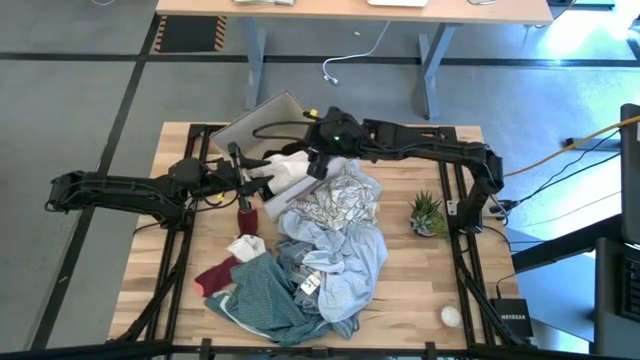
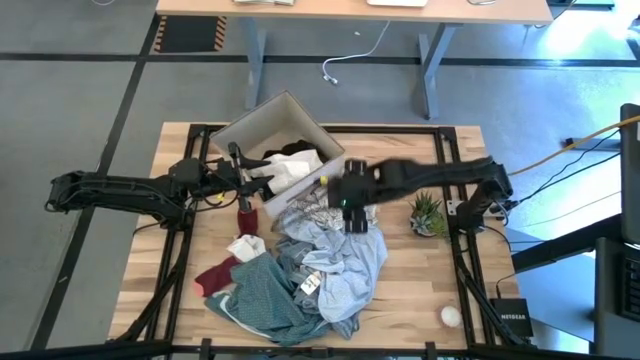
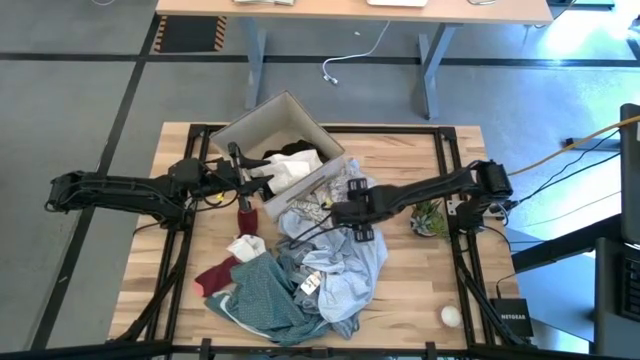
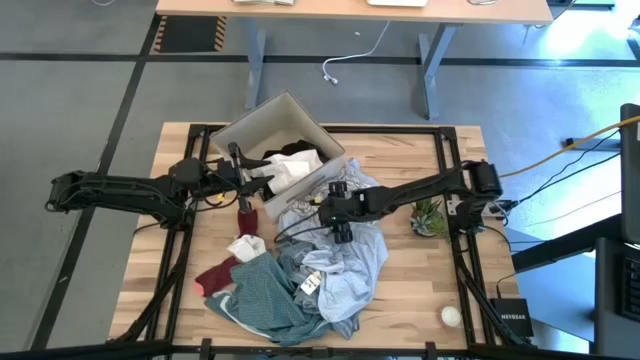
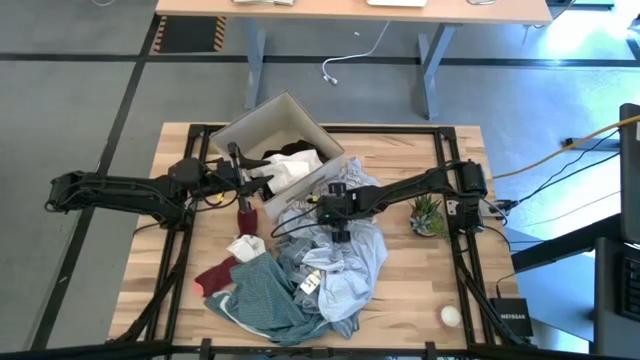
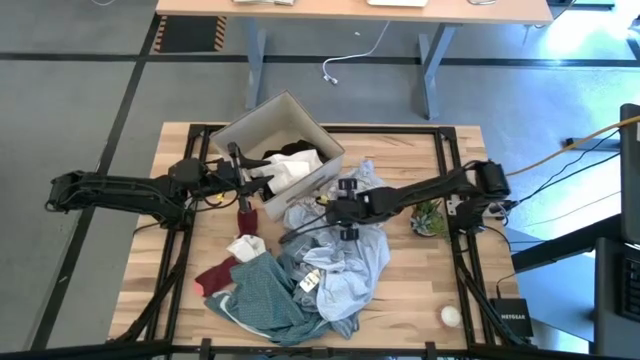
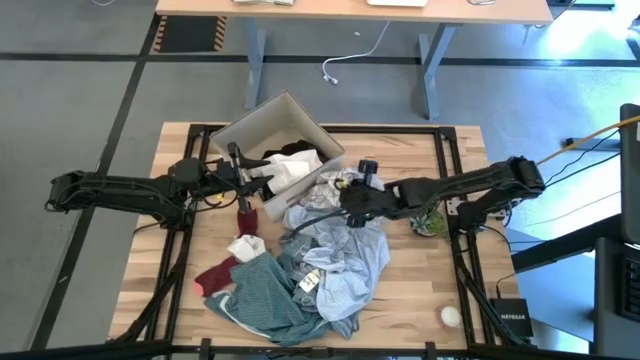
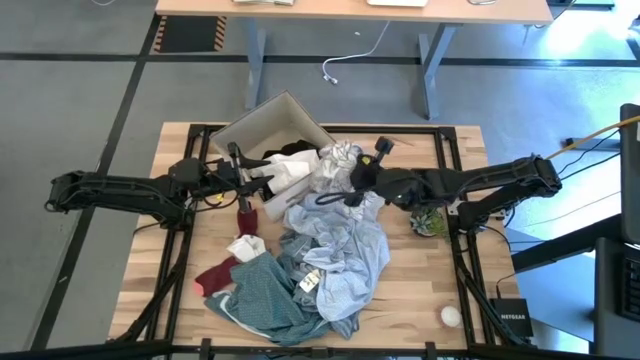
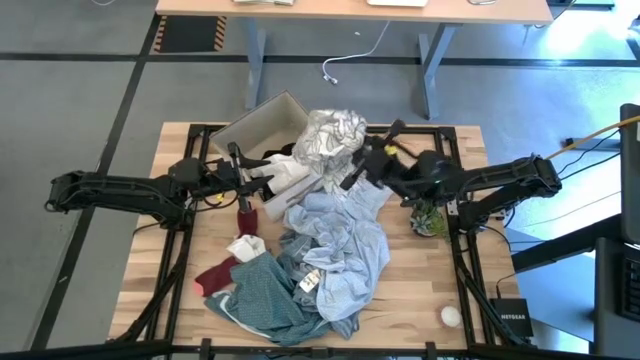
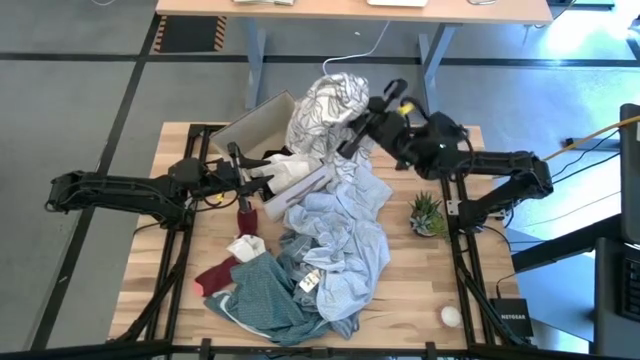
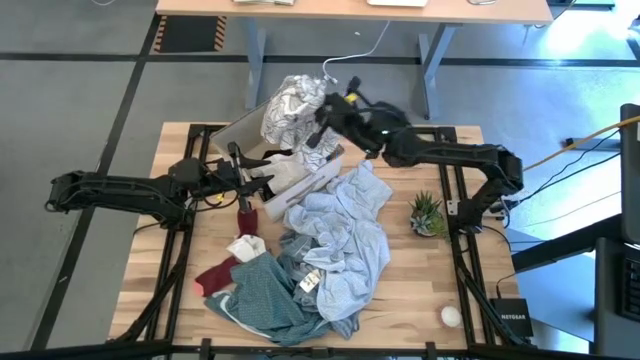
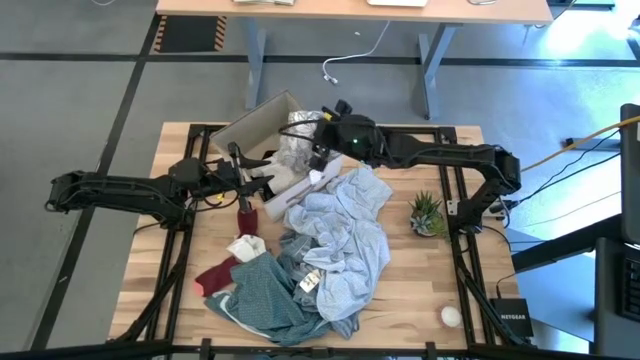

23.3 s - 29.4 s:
Task: Sort clothes
Put the white shirt into the laundry organizer

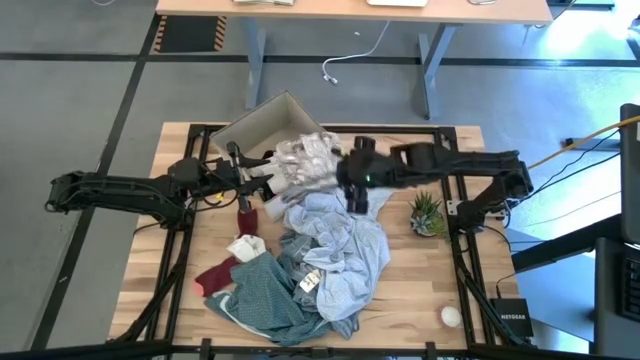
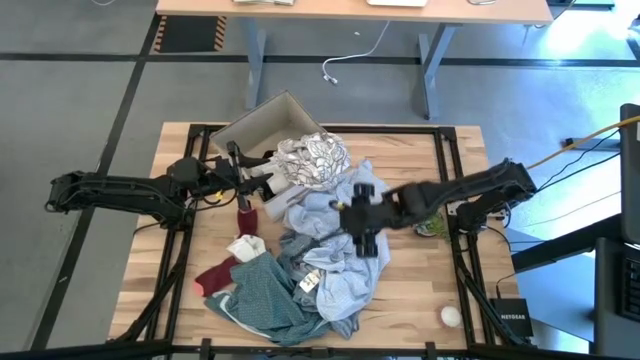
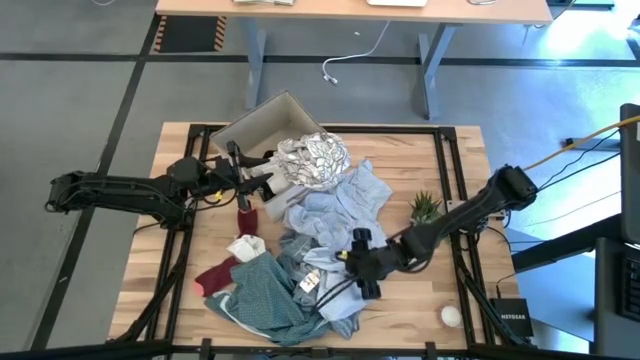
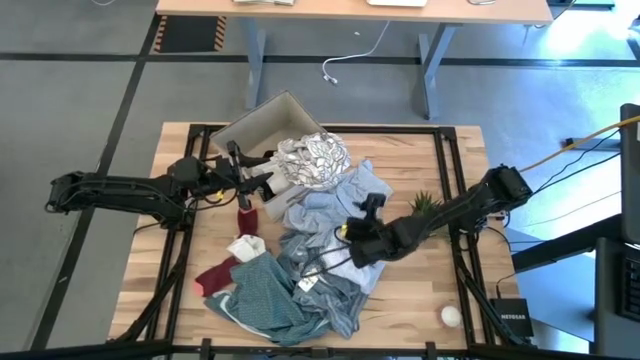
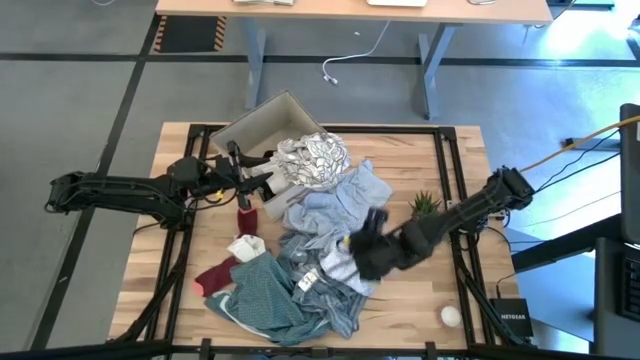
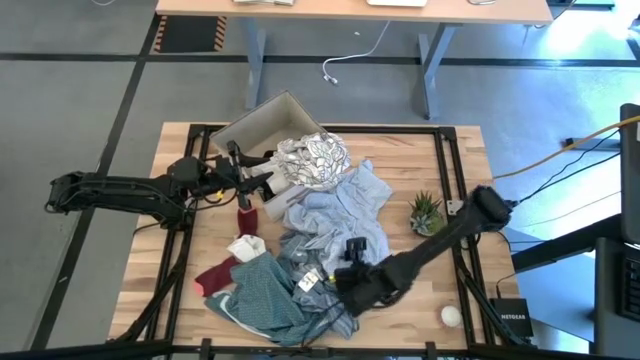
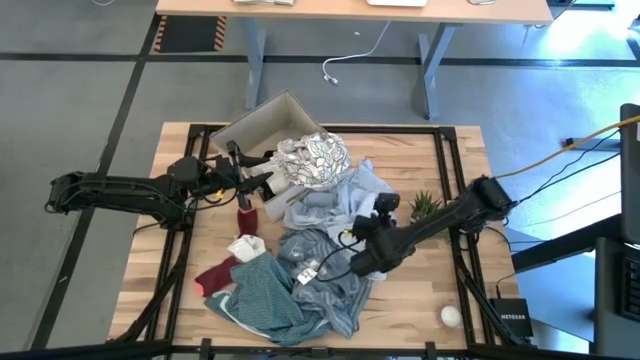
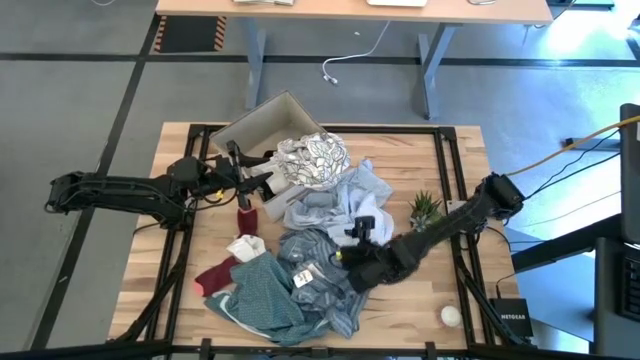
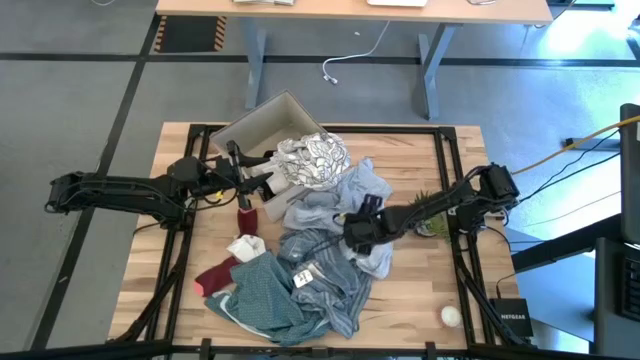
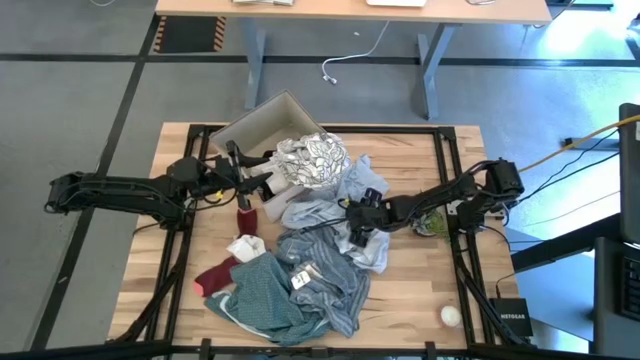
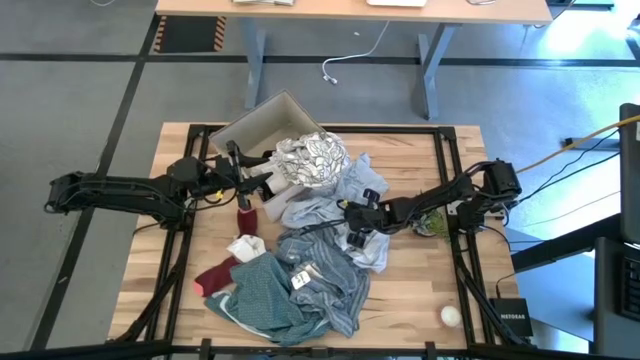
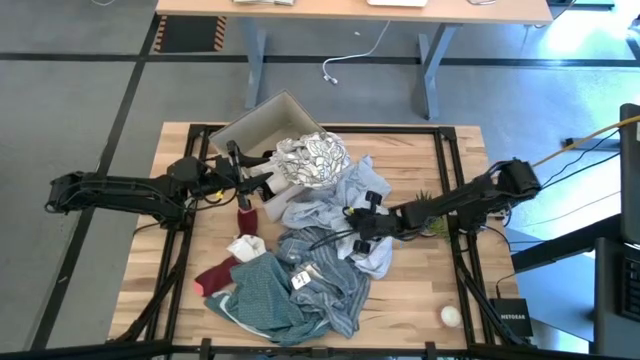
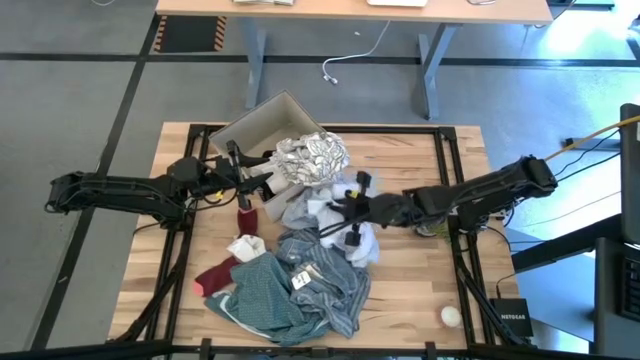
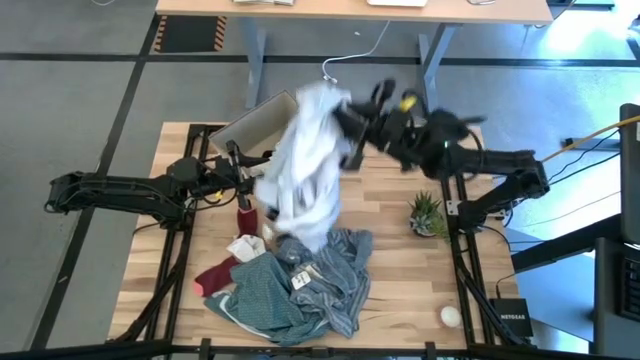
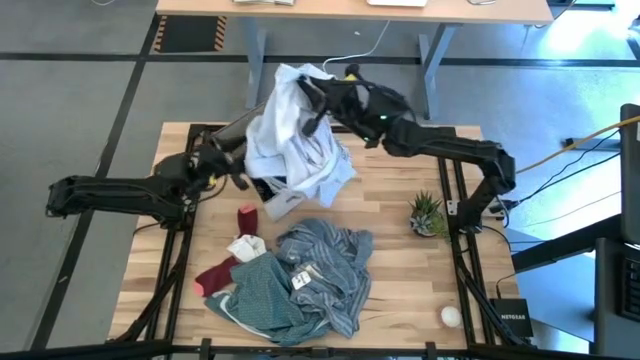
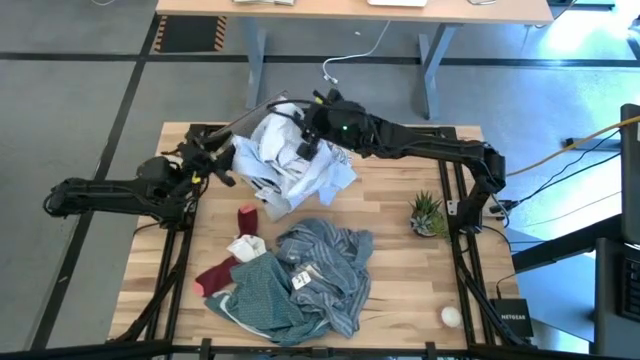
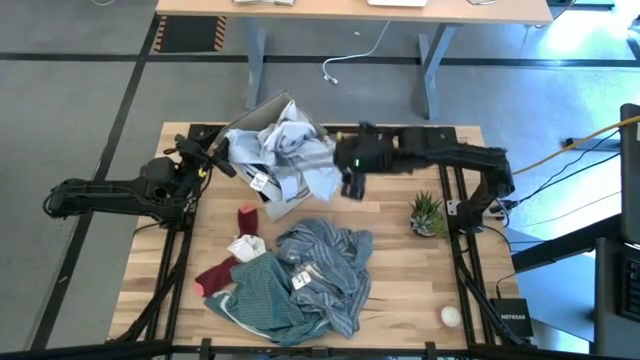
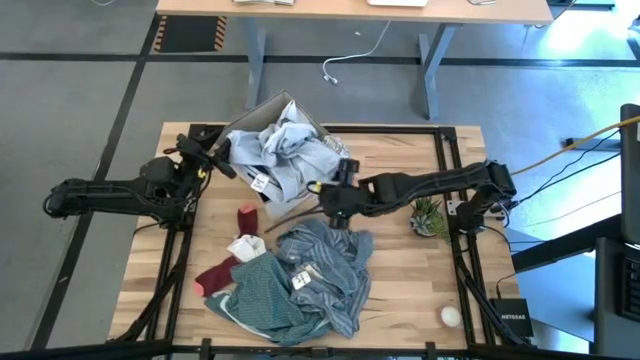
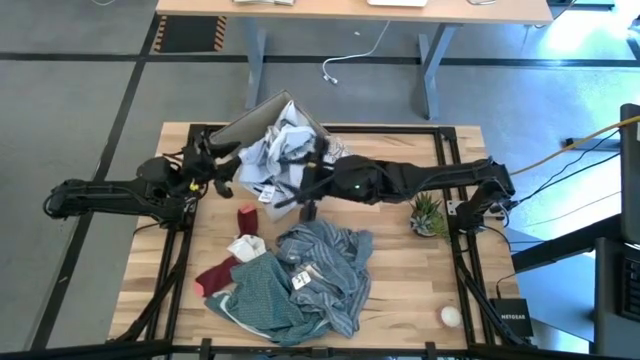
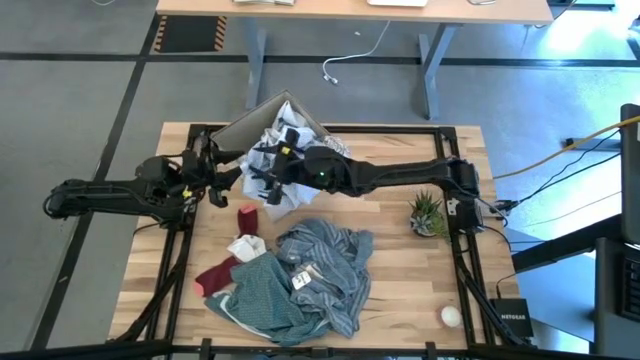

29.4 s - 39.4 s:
Put the light blue shirt into the laundry organizer

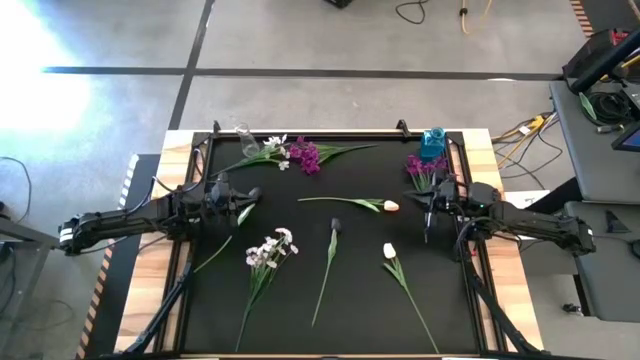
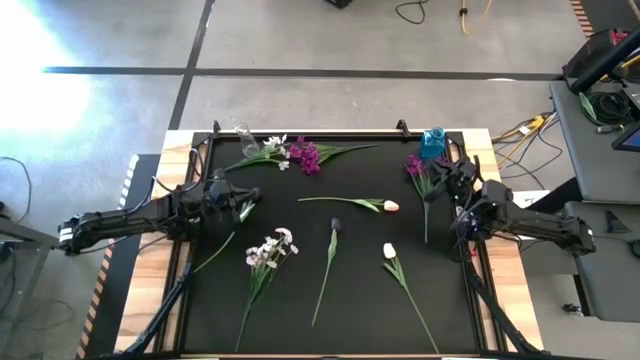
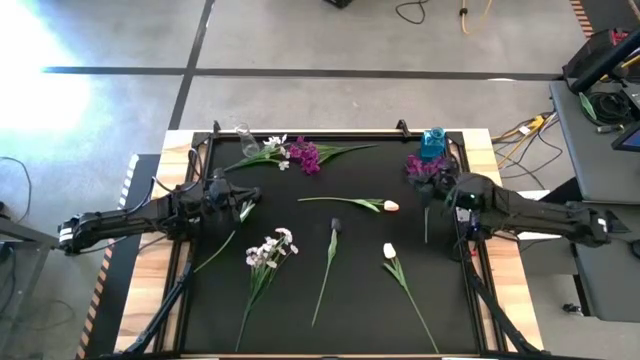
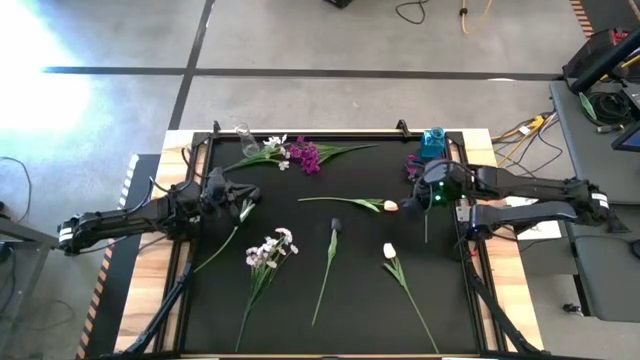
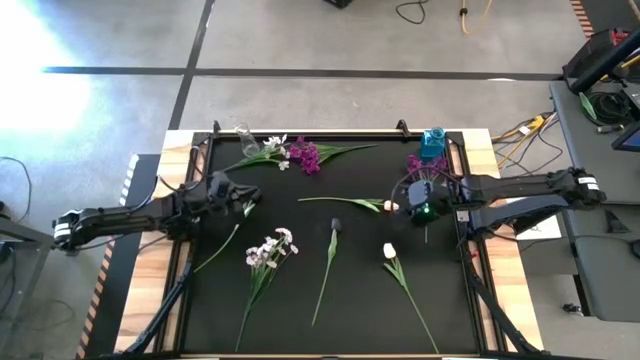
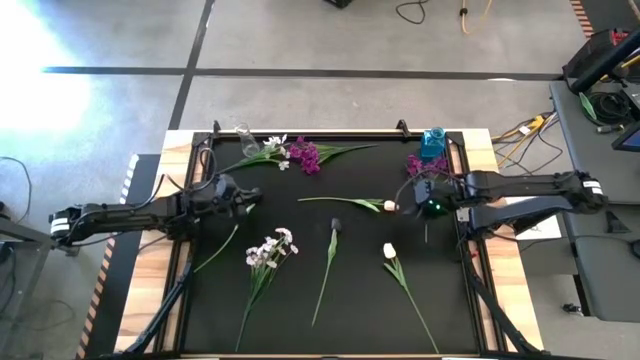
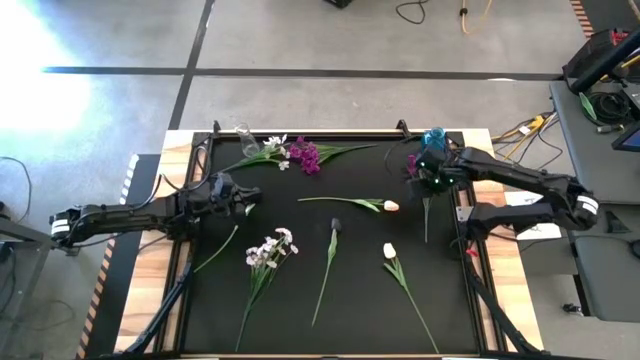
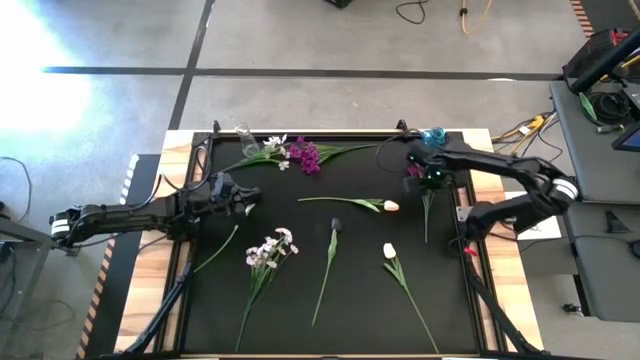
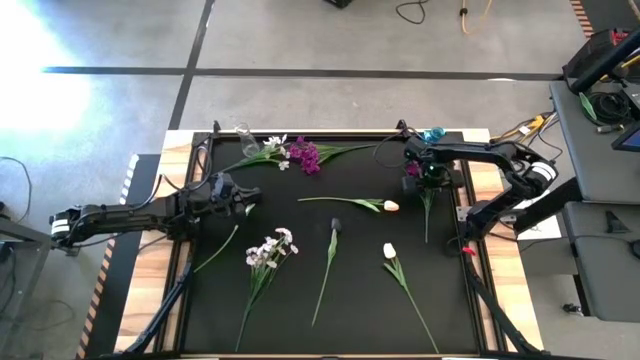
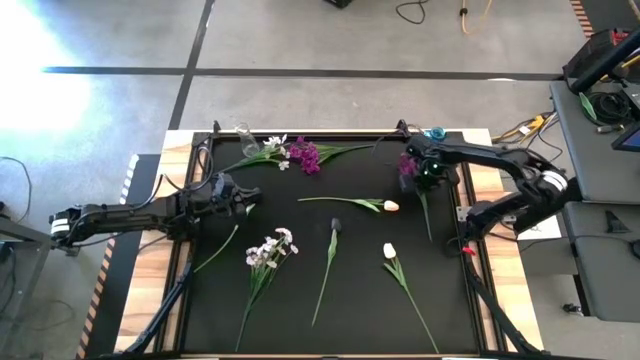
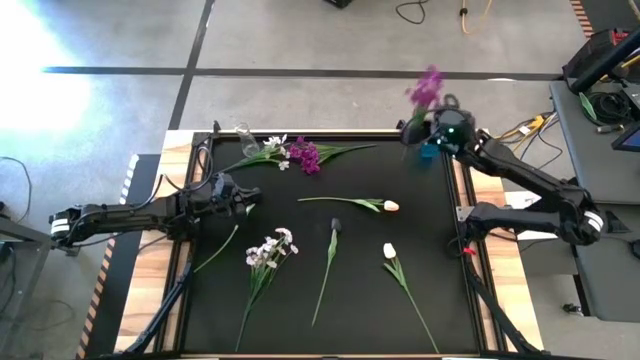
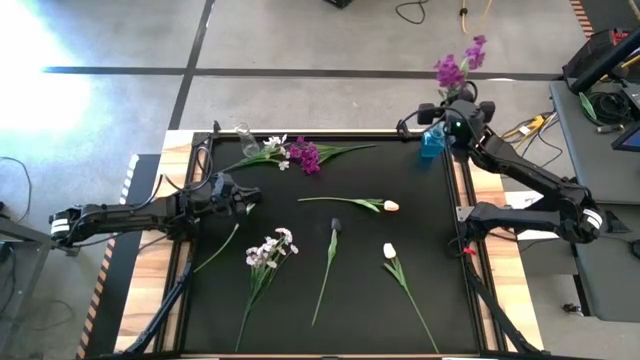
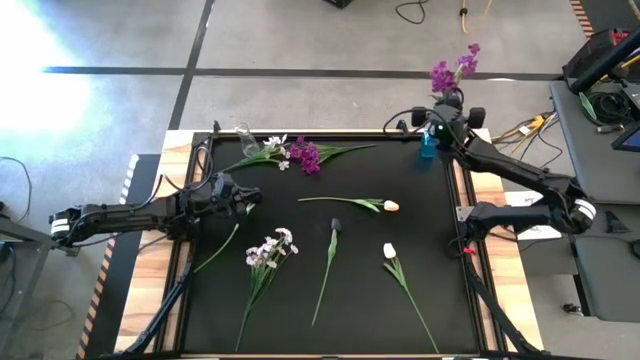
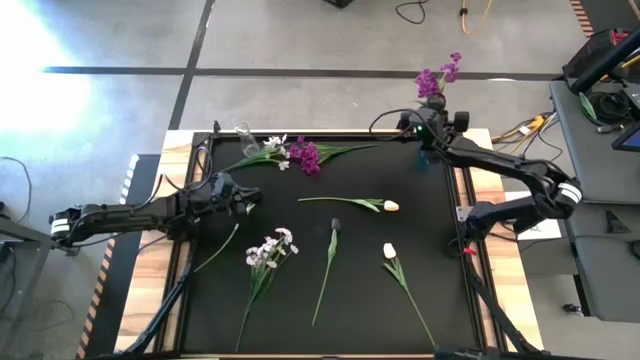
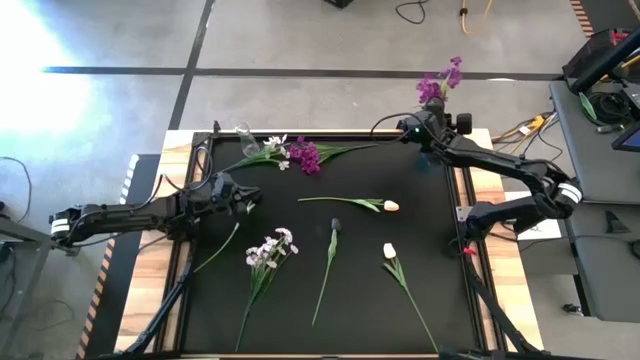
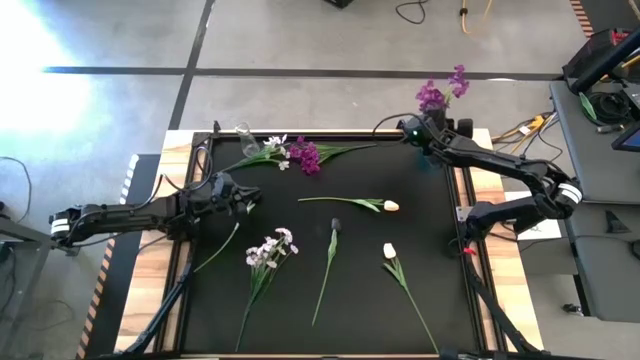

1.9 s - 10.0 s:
Task: Sort flowers into vase by color
Put the right violet flowers into the blue vase
